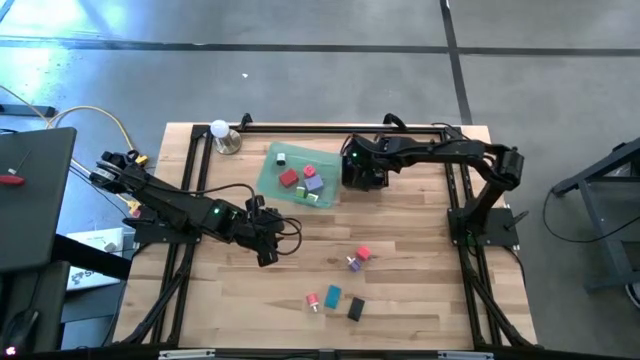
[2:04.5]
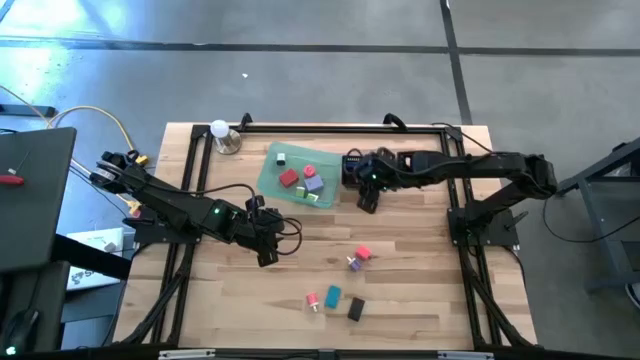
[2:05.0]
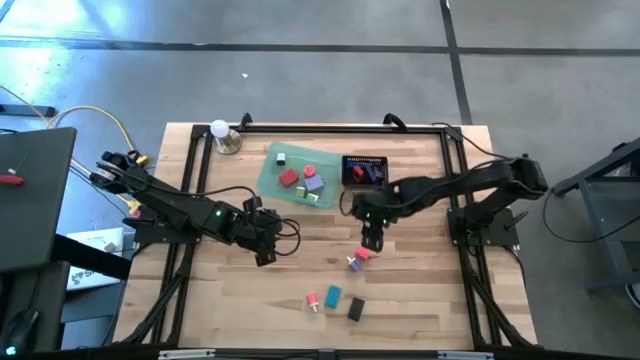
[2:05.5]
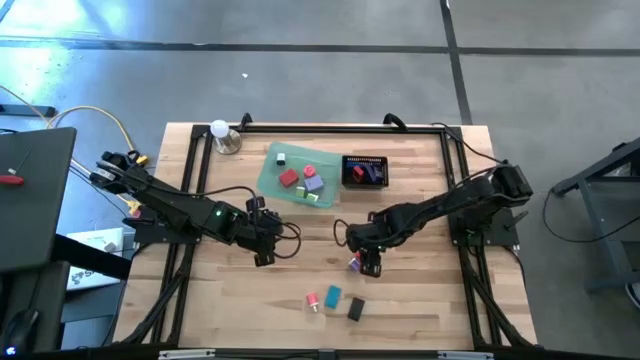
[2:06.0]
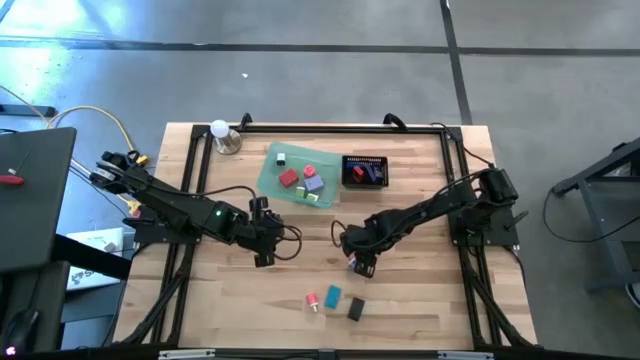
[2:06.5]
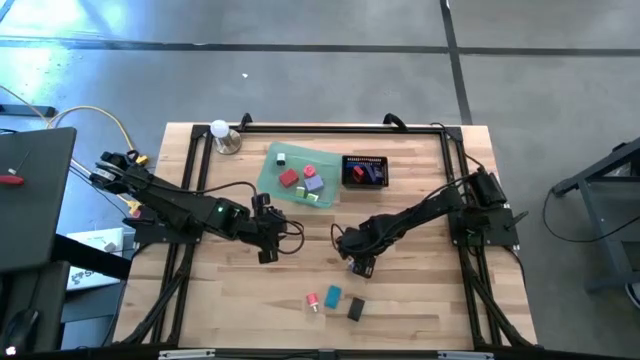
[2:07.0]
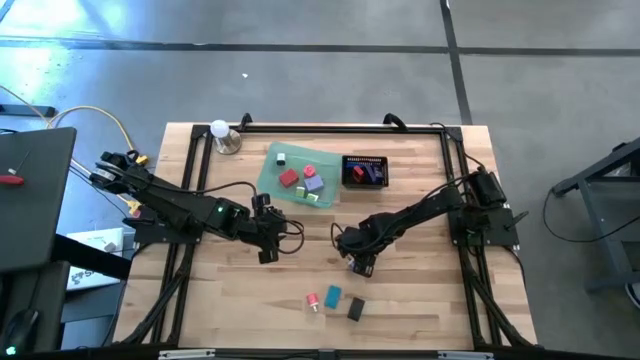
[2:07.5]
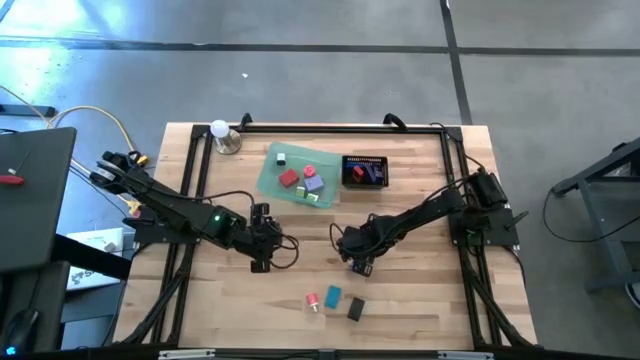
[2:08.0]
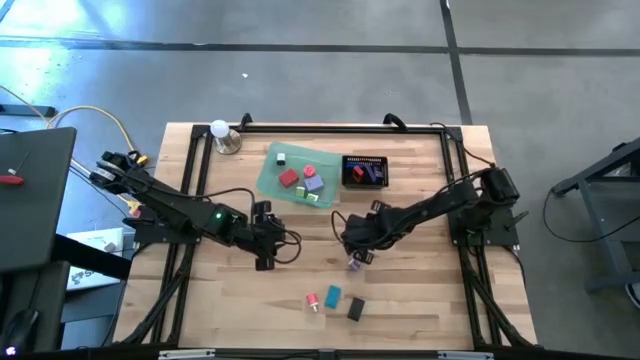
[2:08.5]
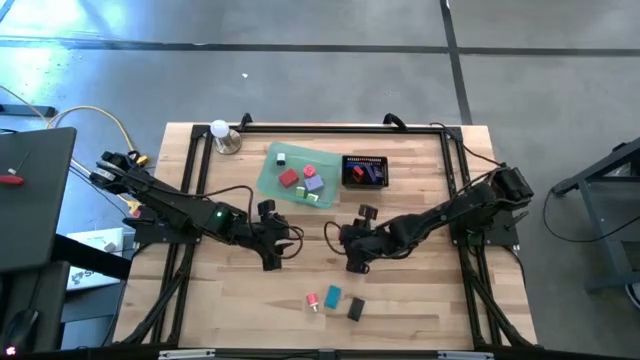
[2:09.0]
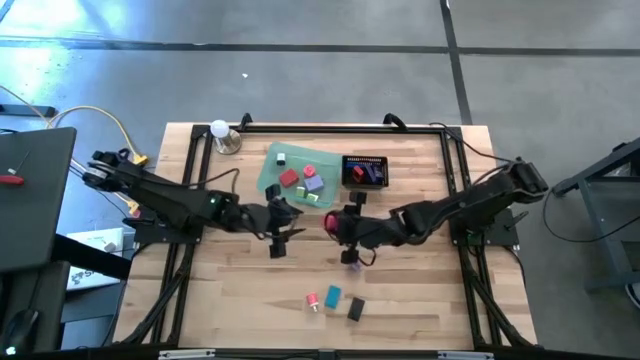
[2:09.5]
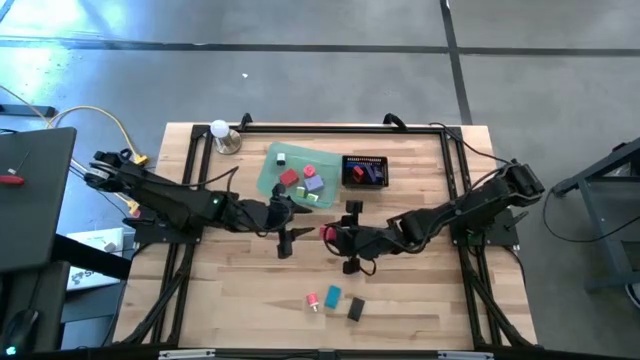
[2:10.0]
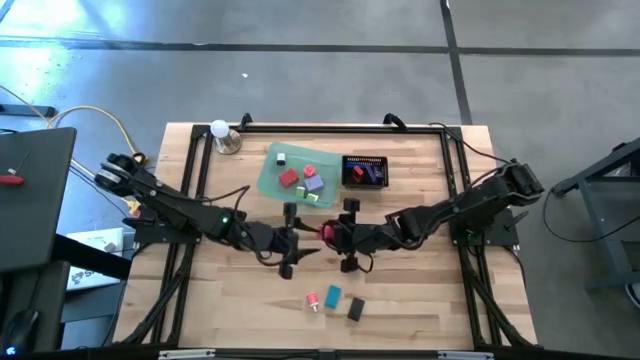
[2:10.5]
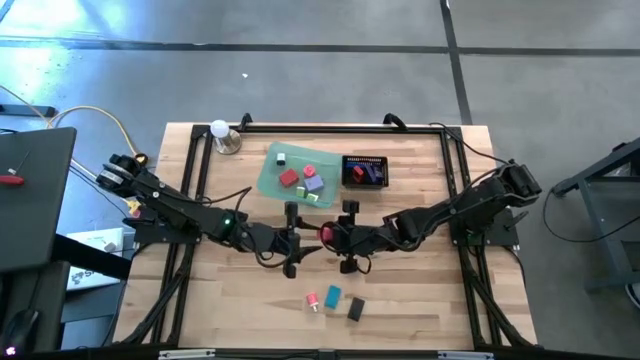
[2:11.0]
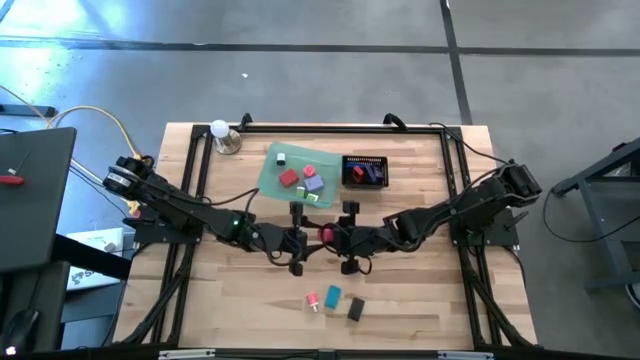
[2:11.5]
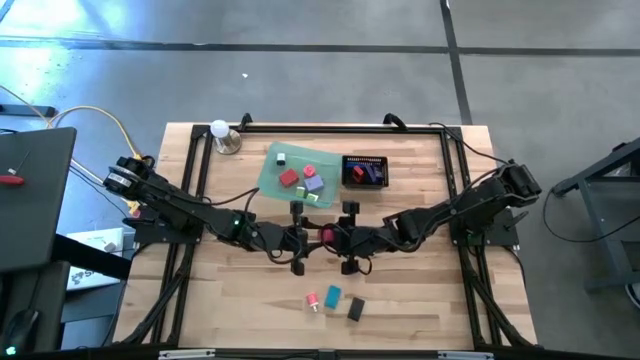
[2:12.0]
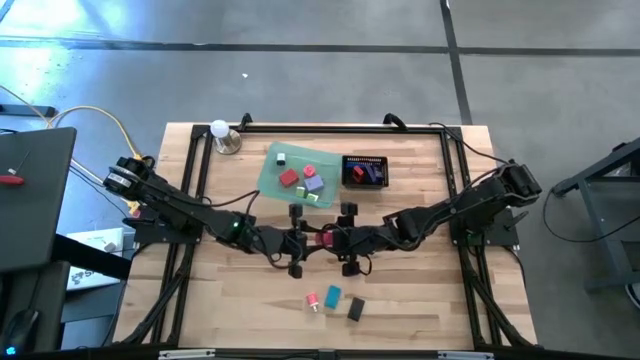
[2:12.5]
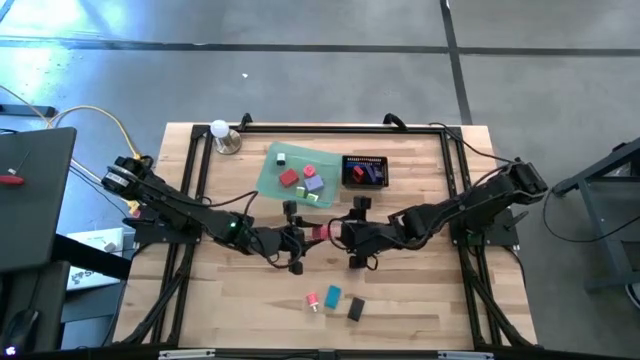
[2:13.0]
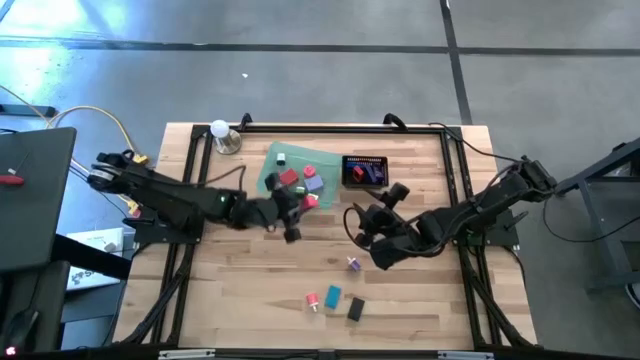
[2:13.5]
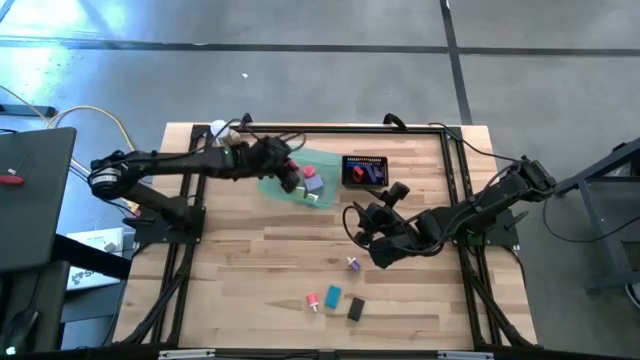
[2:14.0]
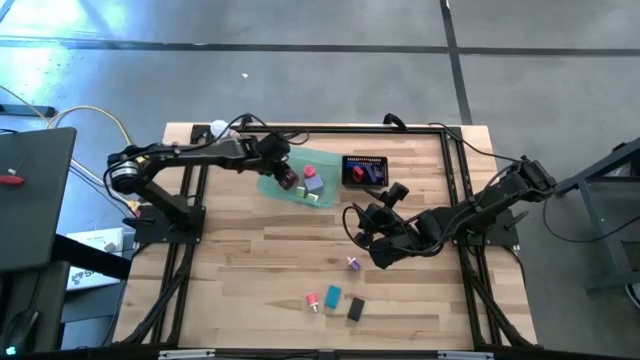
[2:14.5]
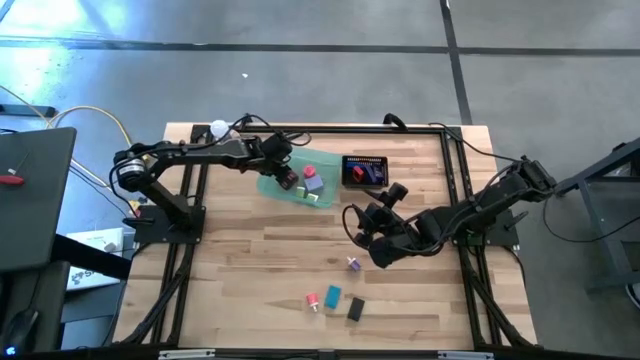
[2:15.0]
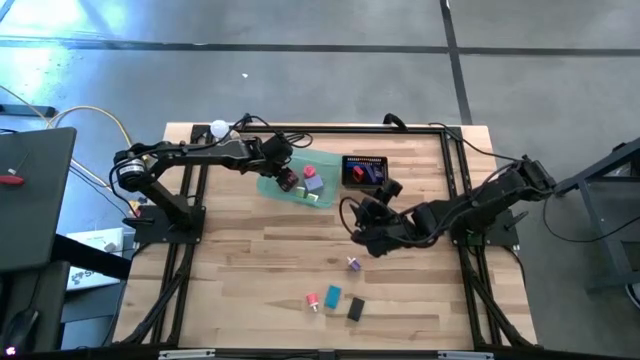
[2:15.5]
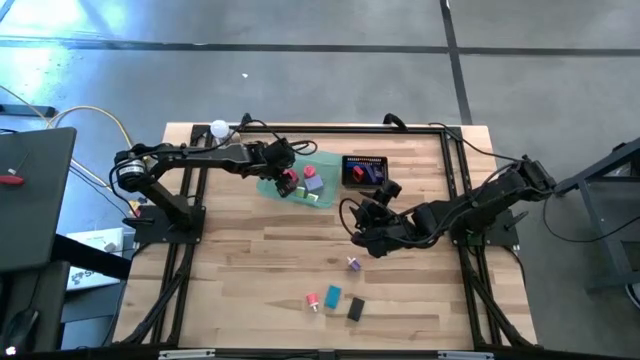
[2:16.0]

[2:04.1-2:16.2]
Task: Pick & Place Office items
Put the pink charger adapter into the green bin

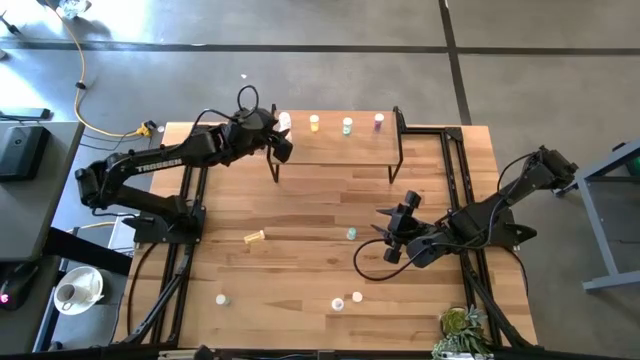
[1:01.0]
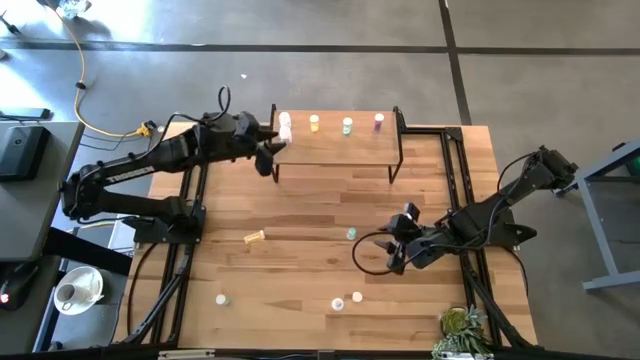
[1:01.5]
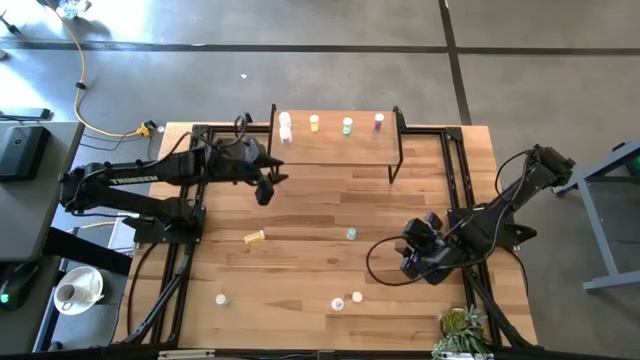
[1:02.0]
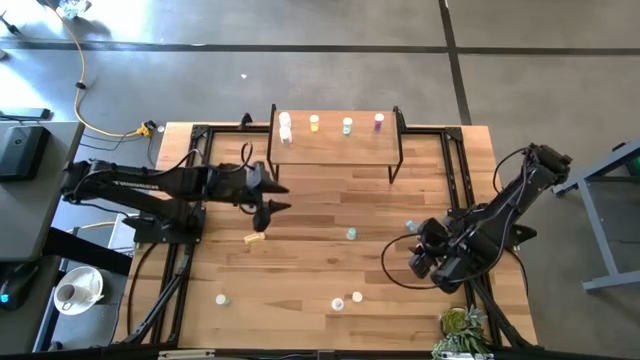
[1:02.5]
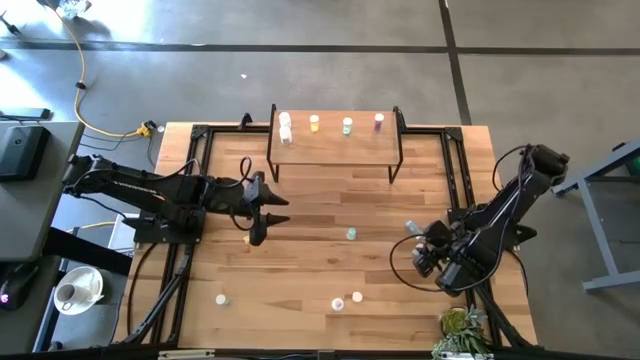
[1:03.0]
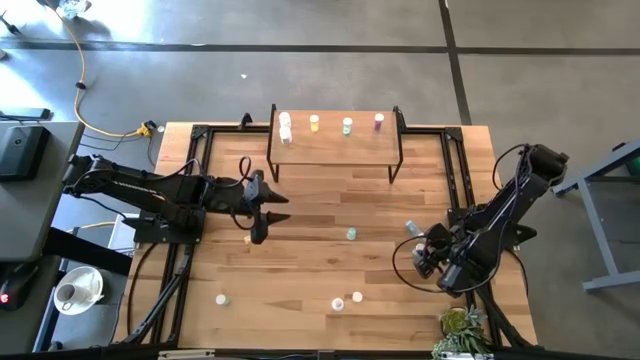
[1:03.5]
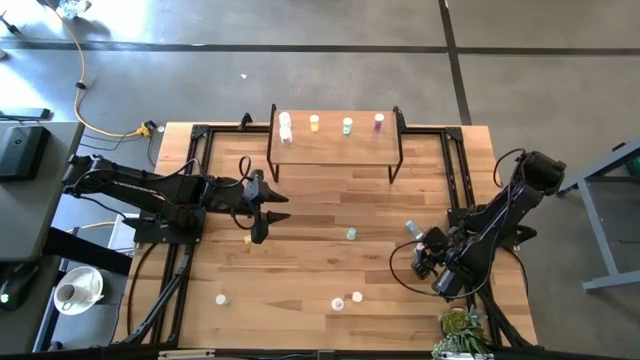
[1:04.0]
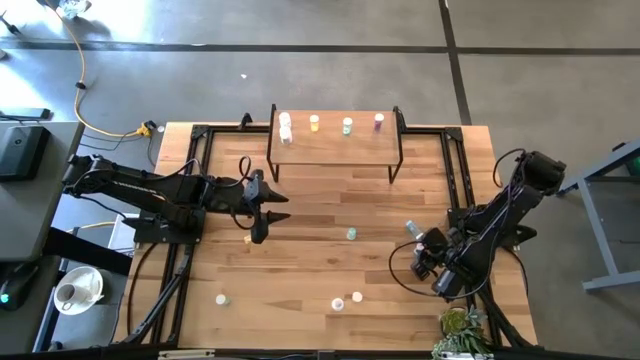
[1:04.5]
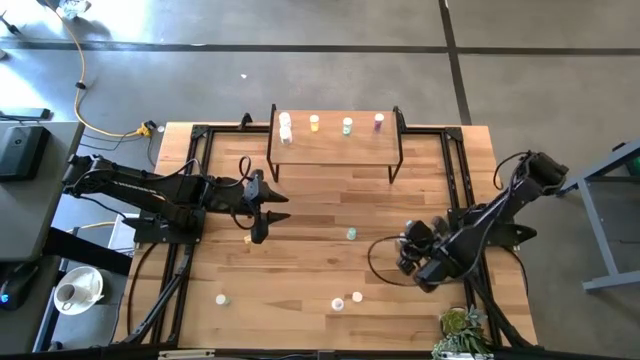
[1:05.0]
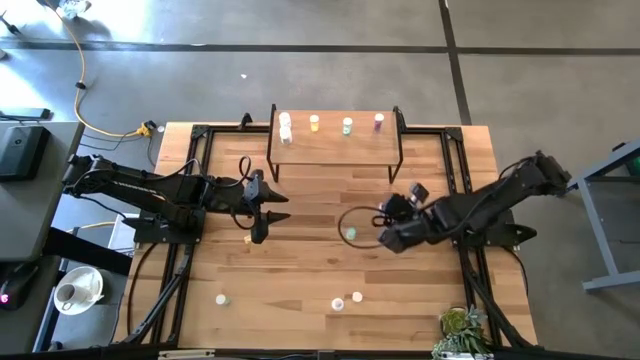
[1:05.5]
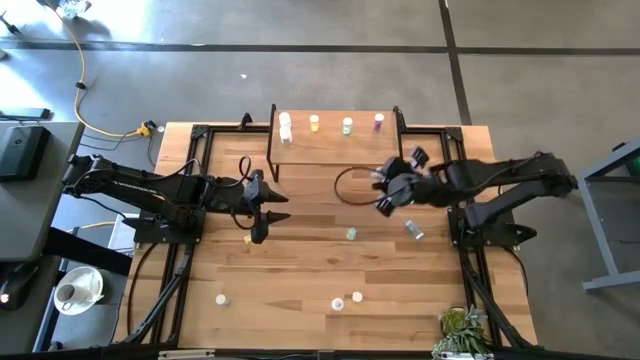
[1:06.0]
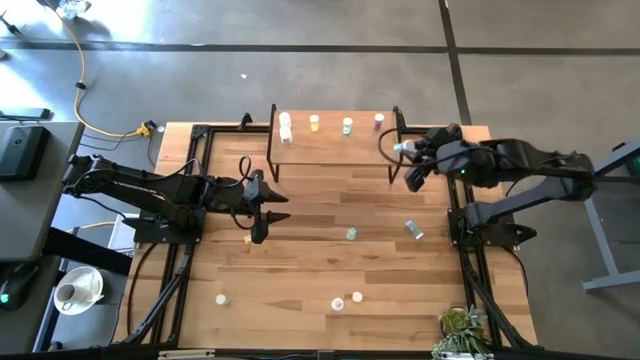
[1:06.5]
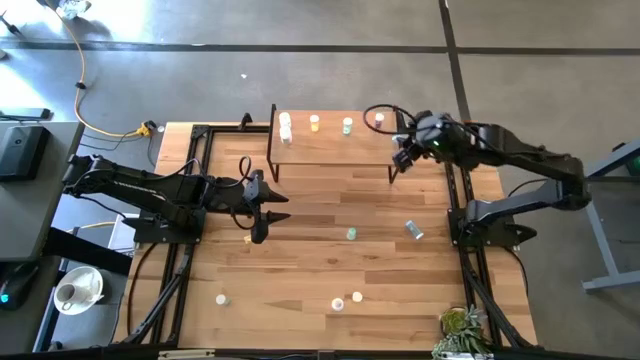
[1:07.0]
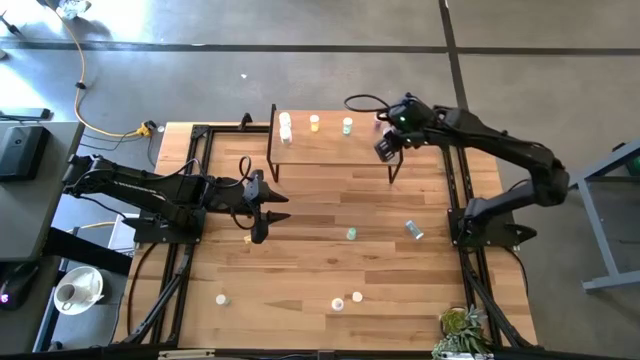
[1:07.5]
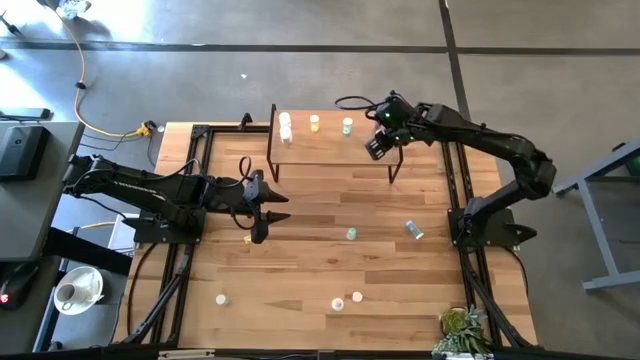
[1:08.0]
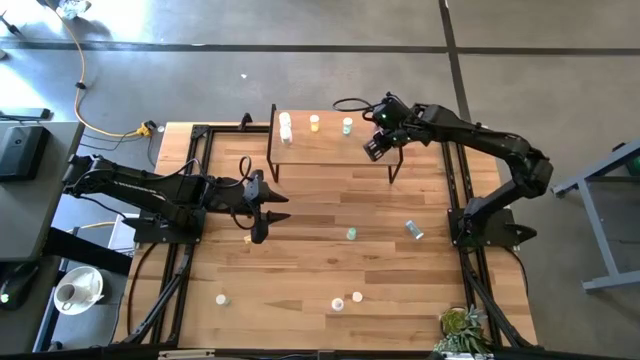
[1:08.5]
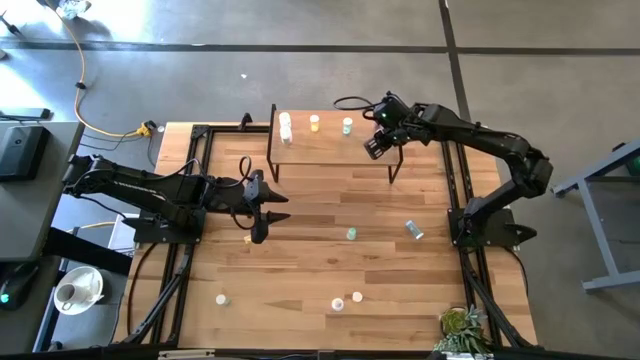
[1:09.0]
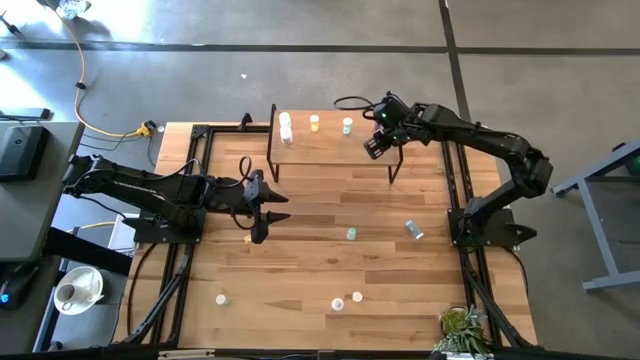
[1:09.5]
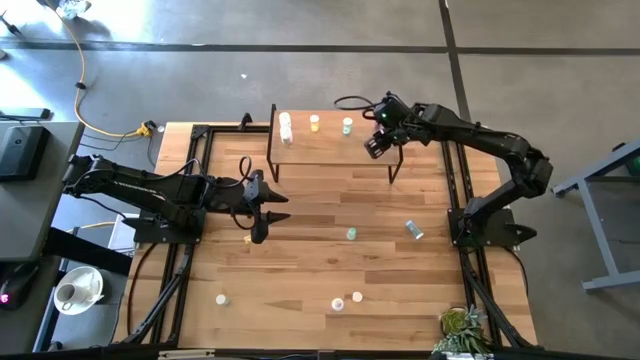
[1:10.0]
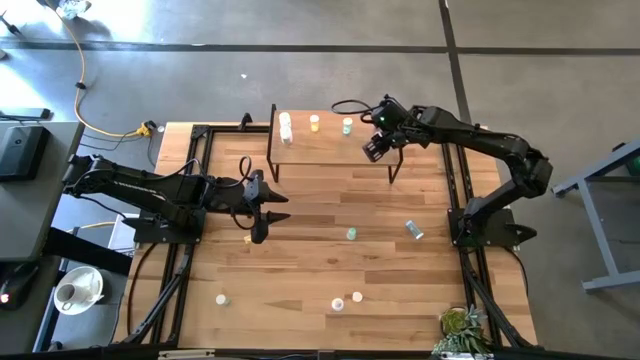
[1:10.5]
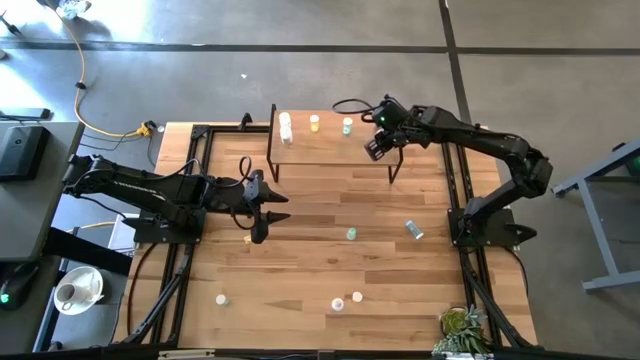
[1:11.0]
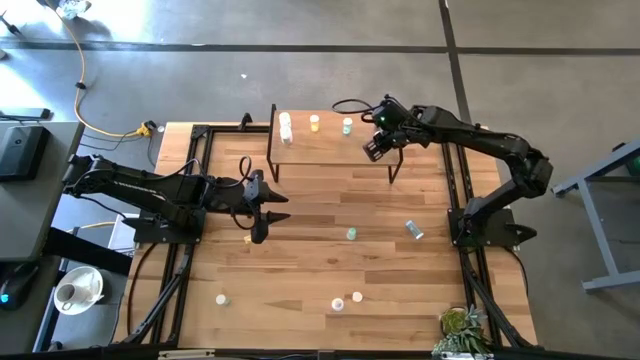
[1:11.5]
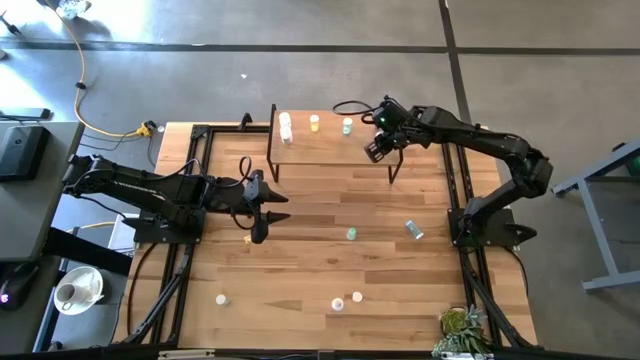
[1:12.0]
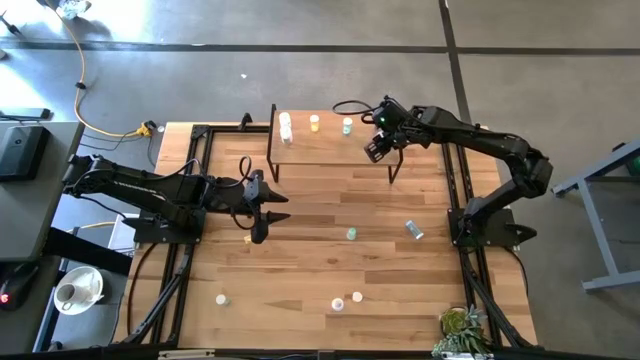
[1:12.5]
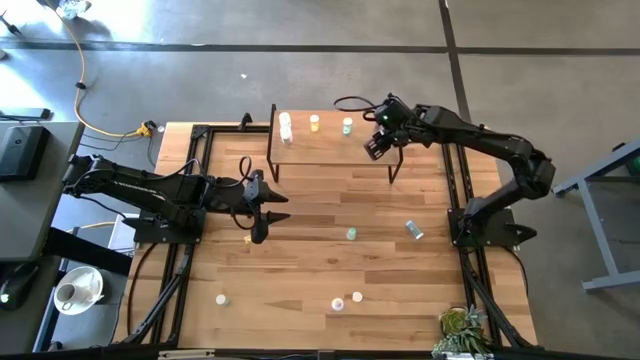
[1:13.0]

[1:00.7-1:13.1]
Task: Pick and place medicine bottles onto shelf by color
Put the bottom blue pill bottle on the shelf aligned with the other blue pill bottle
